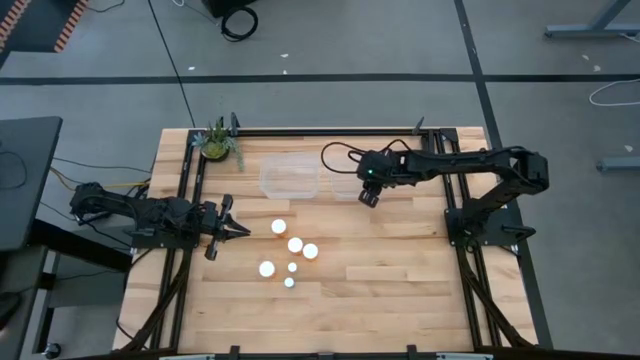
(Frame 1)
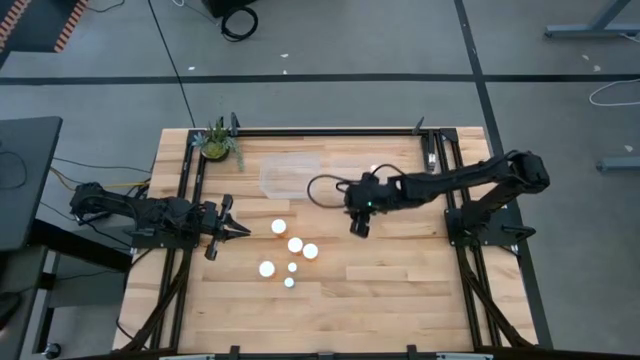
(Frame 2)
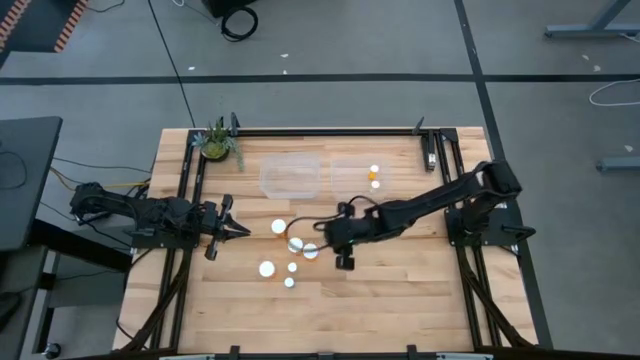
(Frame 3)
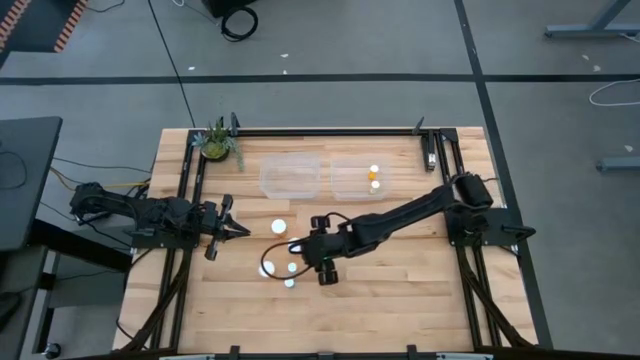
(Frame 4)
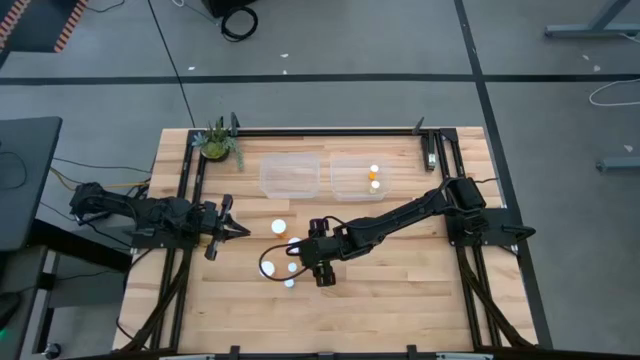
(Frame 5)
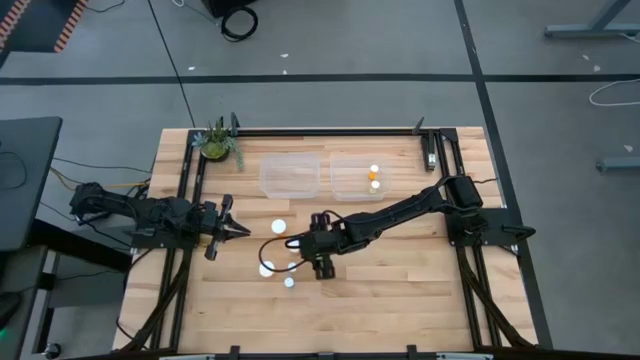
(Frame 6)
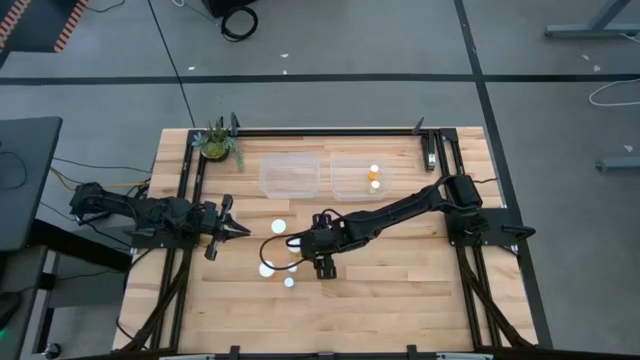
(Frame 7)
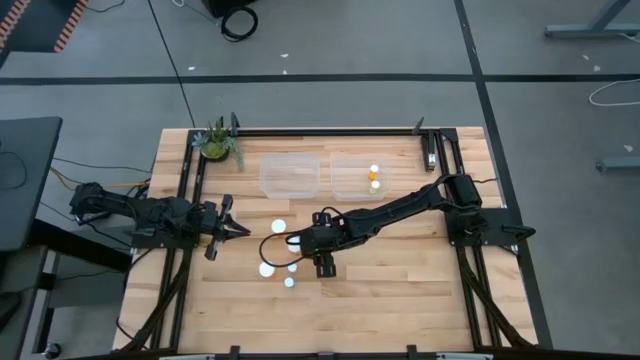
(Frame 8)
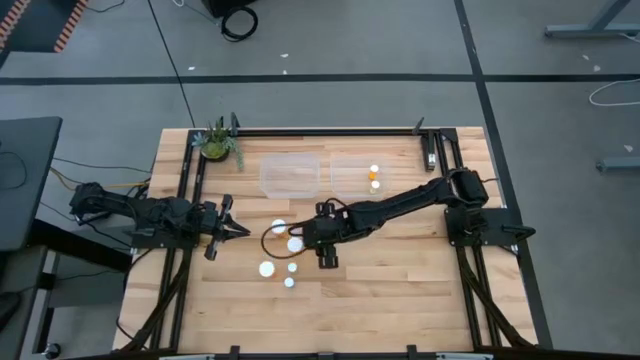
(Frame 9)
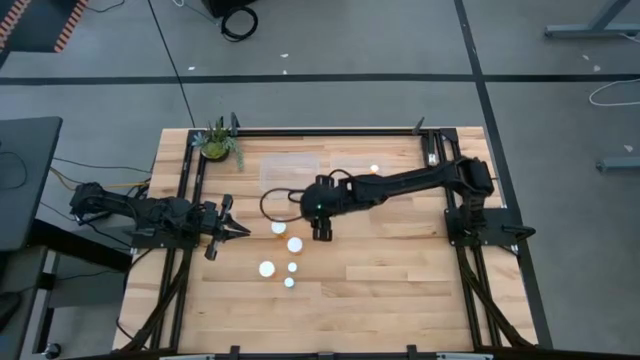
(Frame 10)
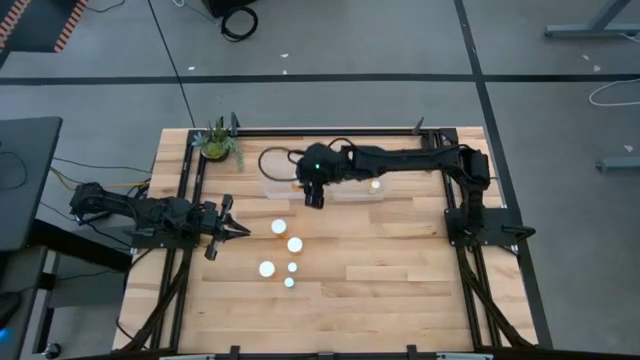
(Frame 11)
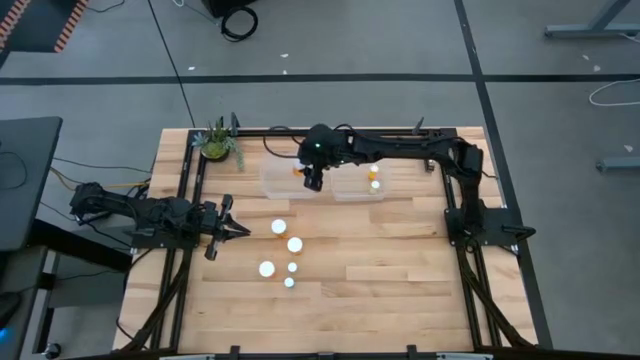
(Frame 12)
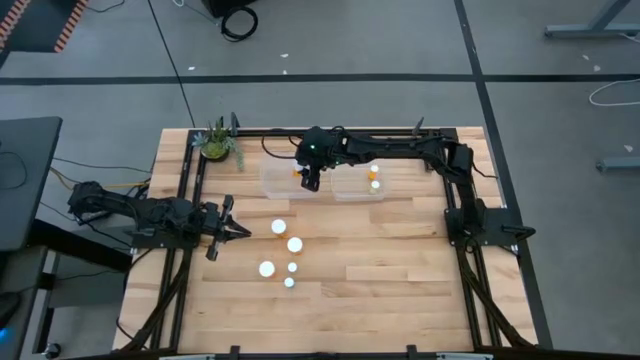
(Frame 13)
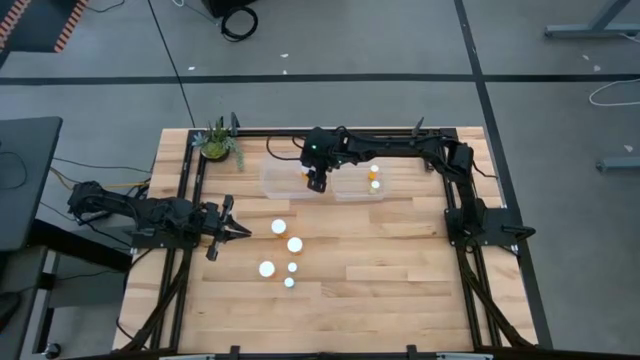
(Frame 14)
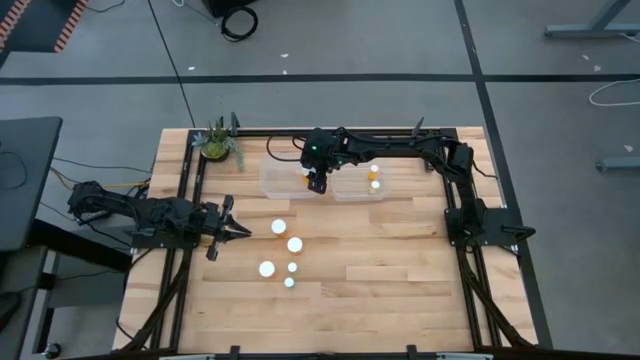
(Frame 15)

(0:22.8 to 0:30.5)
Task: Pick and place medicine bottles into bin by pill shape (circle, oval)
Put the large orange pill bottle into the left transparent bin

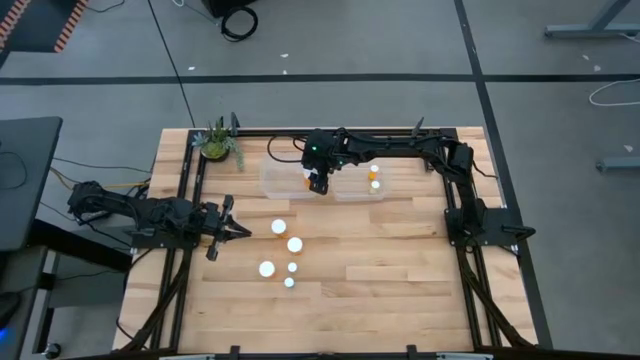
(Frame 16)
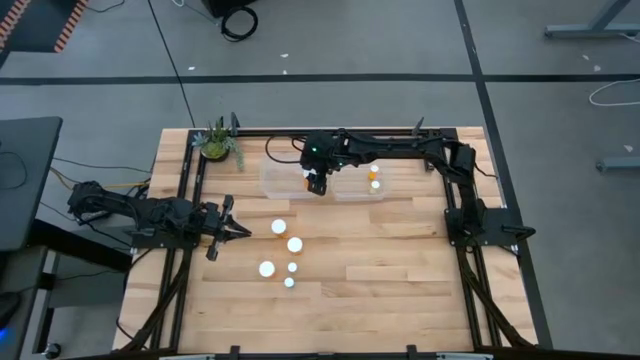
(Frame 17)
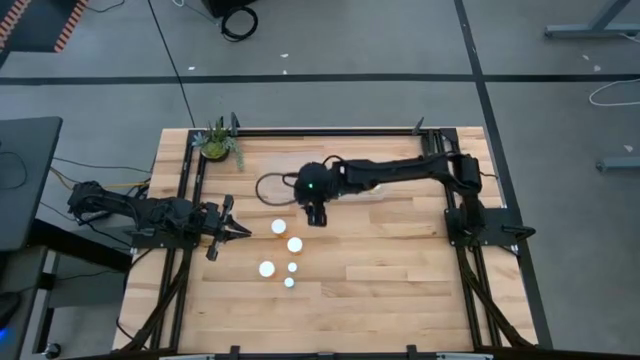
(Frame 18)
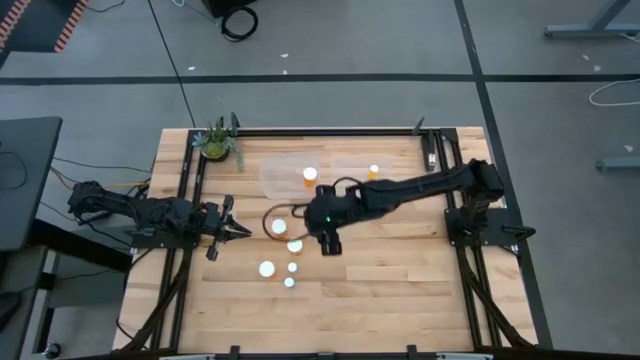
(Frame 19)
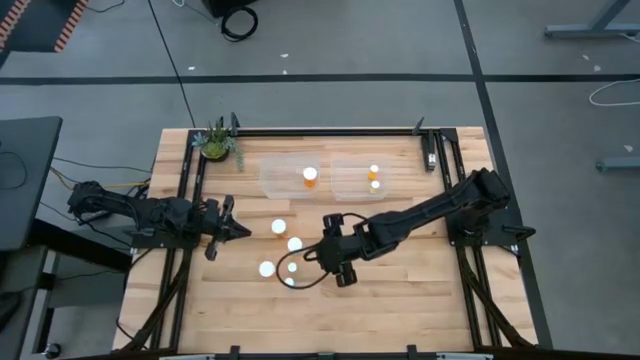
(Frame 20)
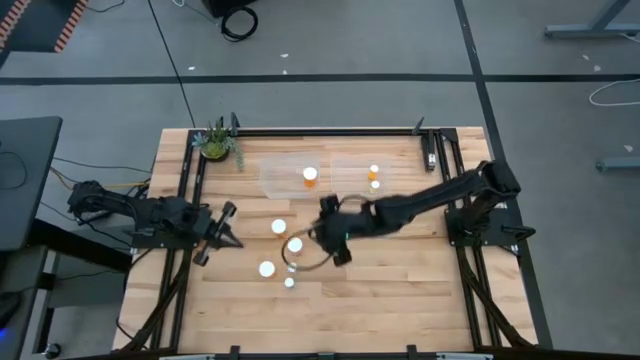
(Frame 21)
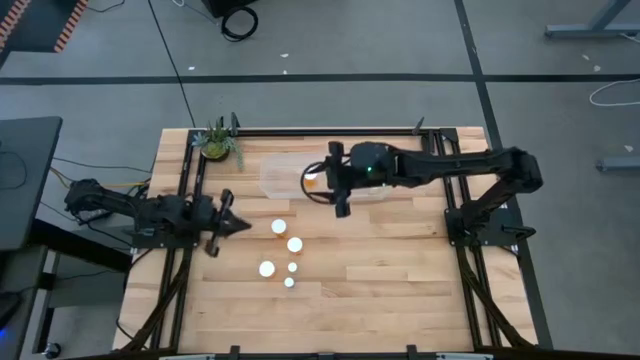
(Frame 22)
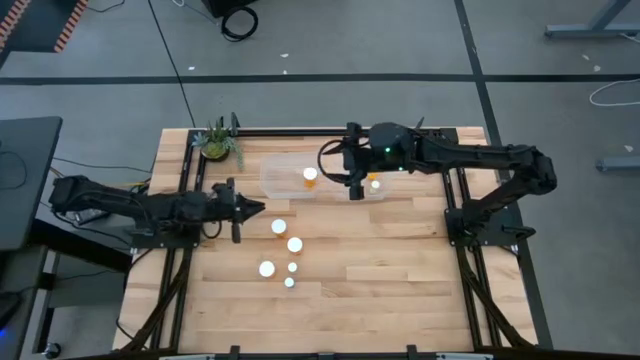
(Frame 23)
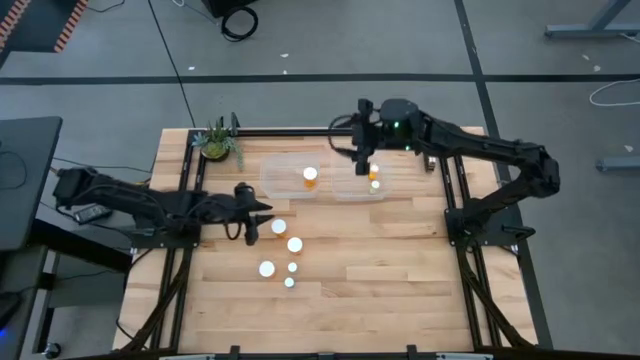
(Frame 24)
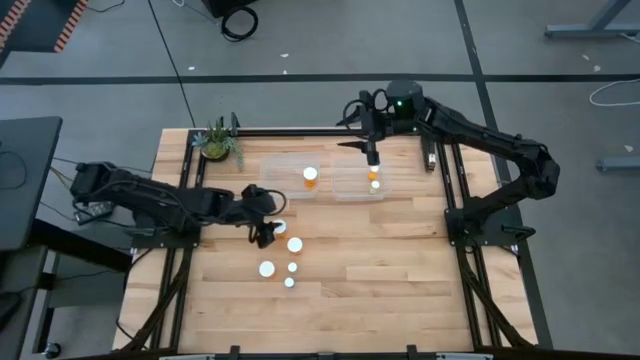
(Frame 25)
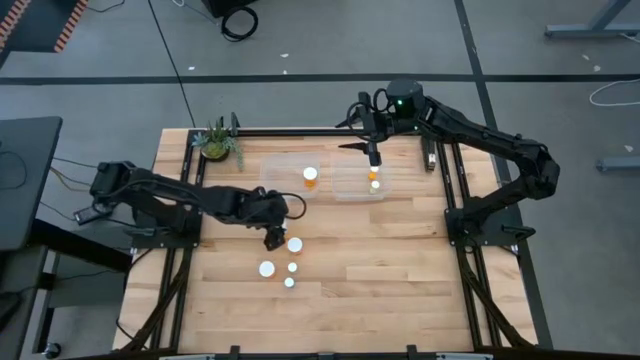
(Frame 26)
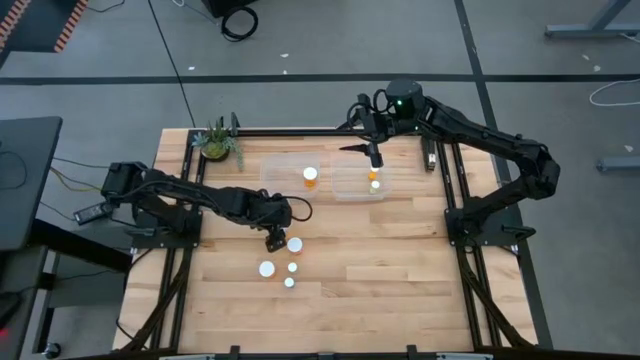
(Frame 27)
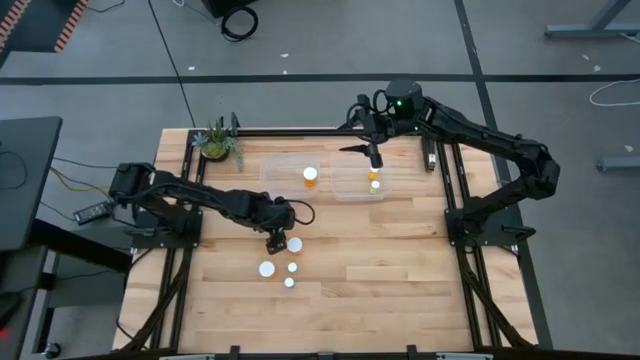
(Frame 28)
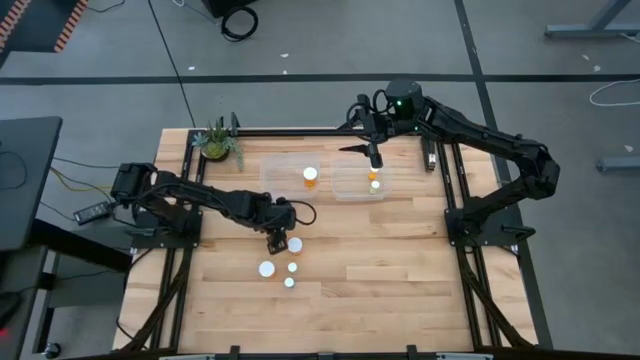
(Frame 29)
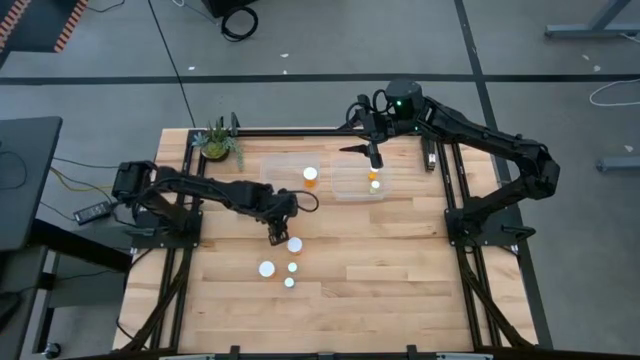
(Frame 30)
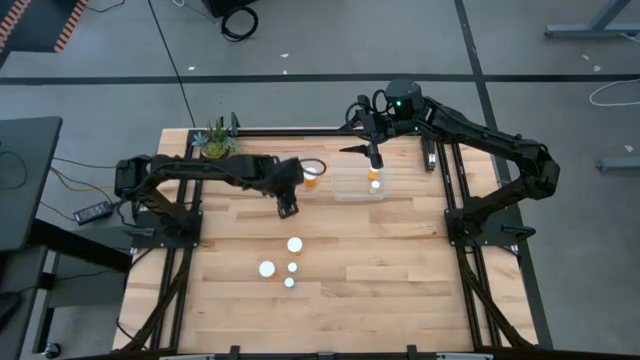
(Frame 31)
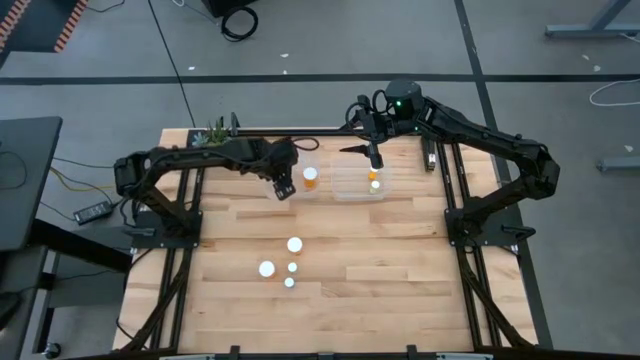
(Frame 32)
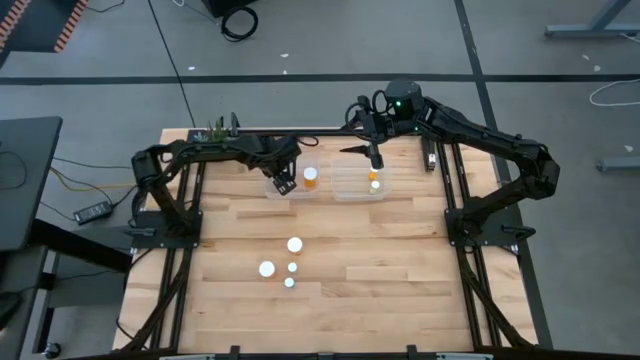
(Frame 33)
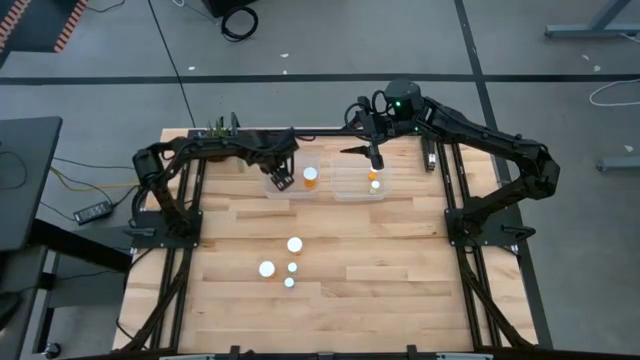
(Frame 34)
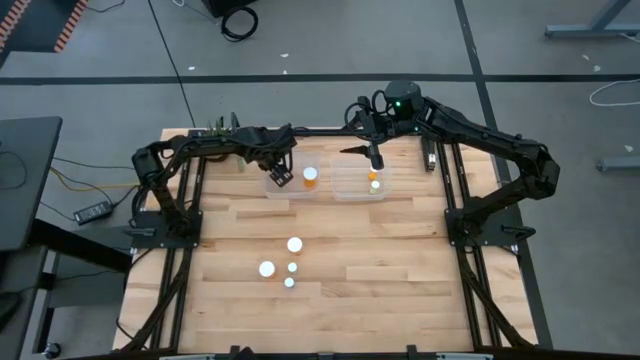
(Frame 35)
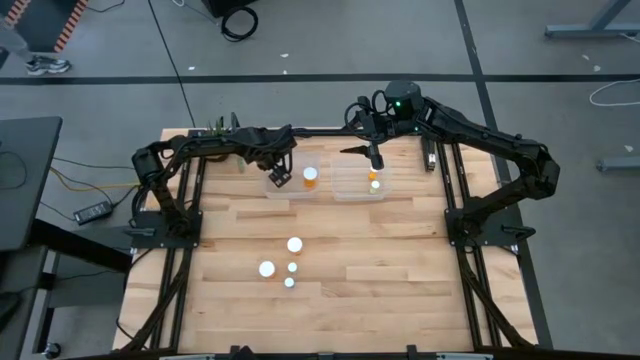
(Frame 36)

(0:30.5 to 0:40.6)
Put the large orange pill bottle into the left transparent bin

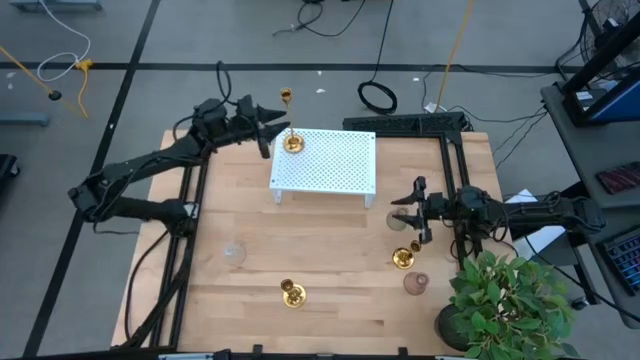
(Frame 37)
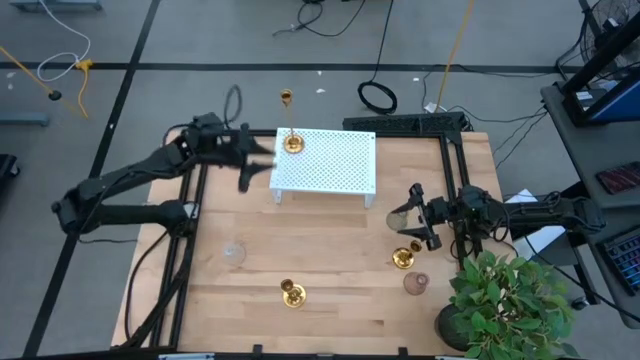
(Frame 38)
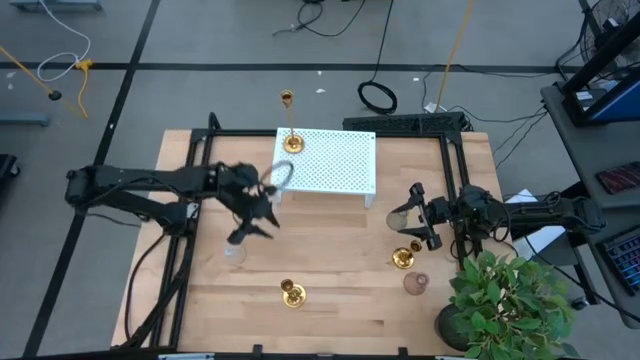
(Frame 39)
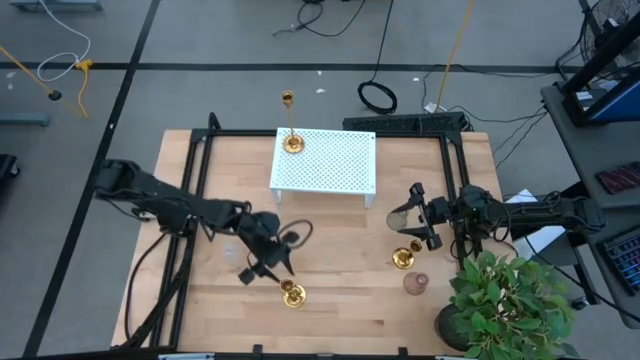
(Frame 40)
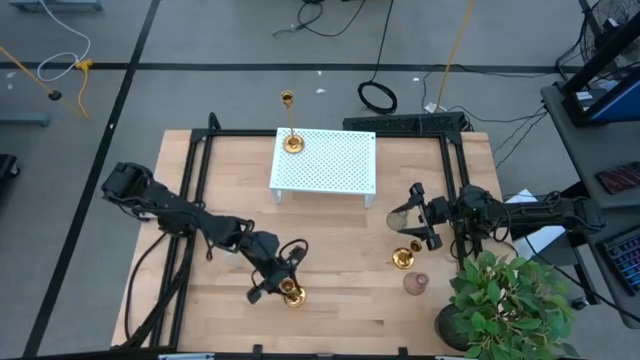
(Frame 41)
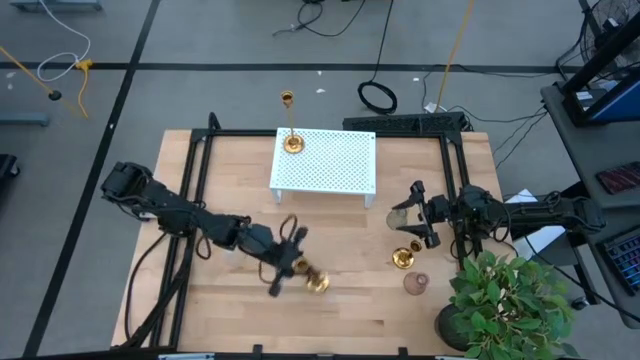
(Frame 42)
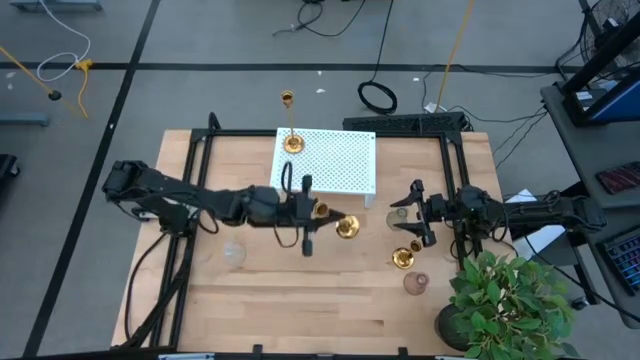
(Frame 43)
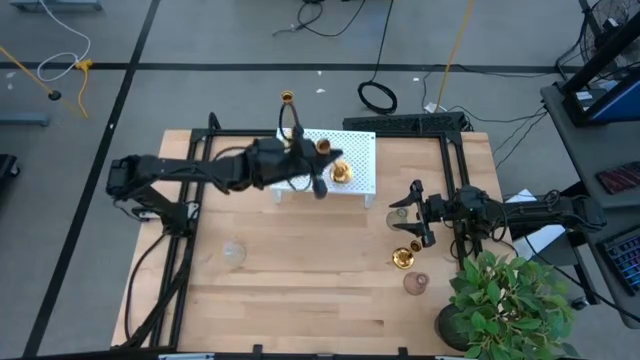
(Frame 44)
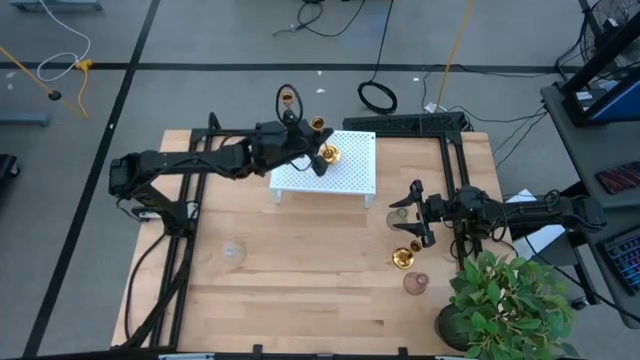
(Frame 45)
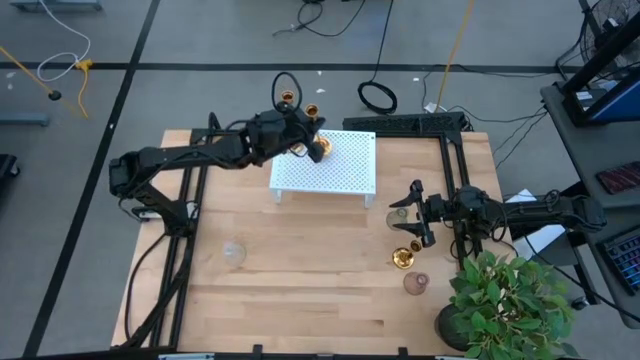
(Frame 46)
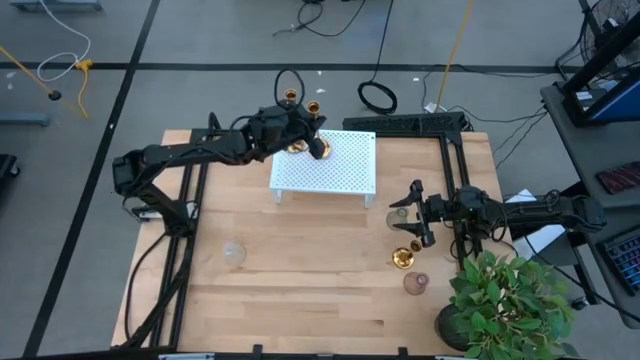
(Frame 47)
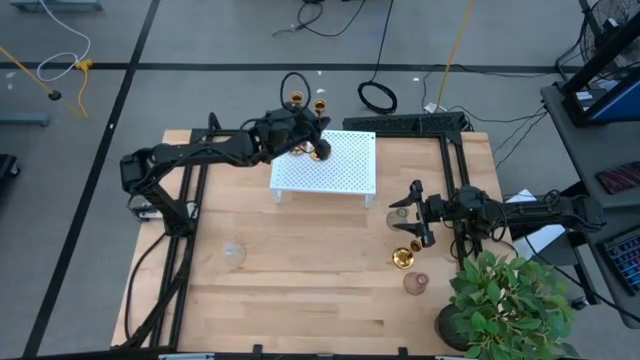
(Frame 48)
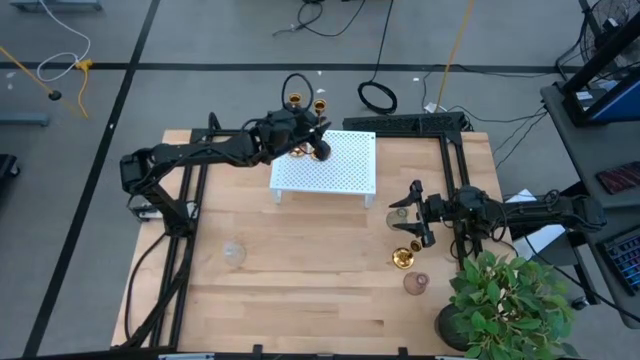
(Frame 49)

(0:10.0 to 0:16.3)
Task: Pick & Place candle stick holders
Put the bottom long gold candle holder on the shelf
